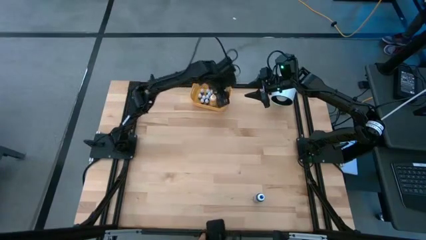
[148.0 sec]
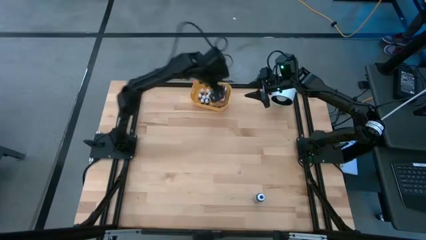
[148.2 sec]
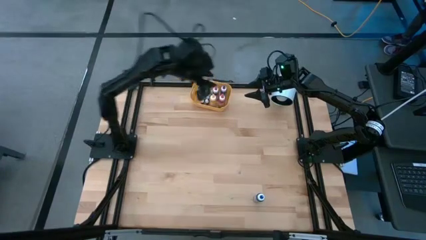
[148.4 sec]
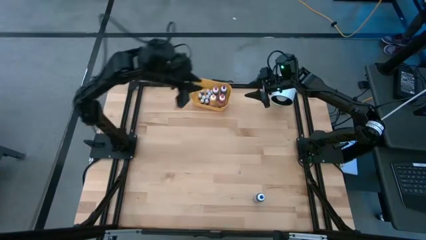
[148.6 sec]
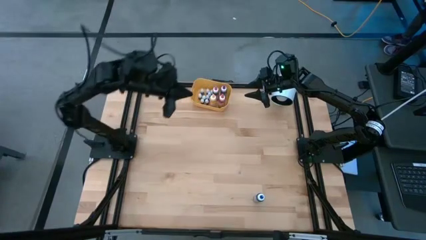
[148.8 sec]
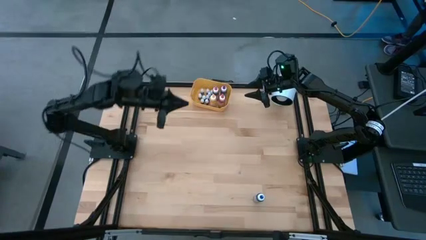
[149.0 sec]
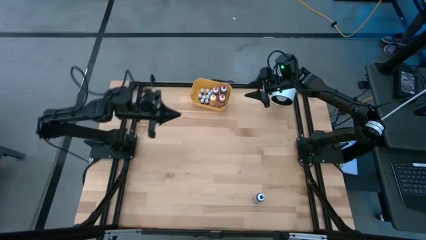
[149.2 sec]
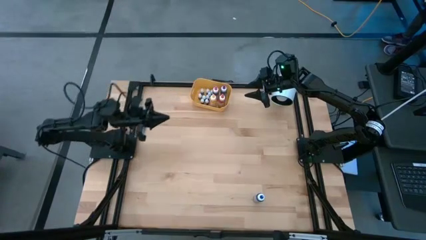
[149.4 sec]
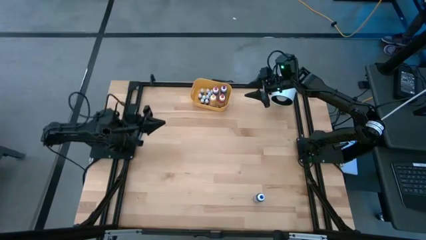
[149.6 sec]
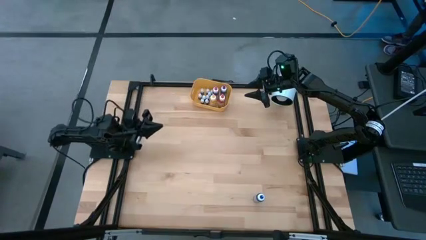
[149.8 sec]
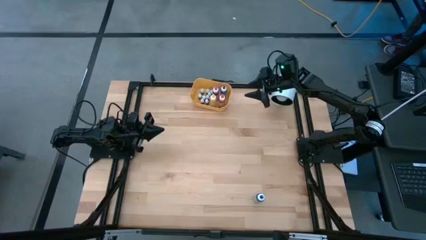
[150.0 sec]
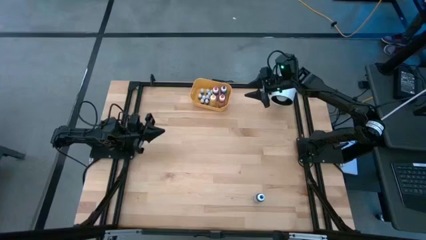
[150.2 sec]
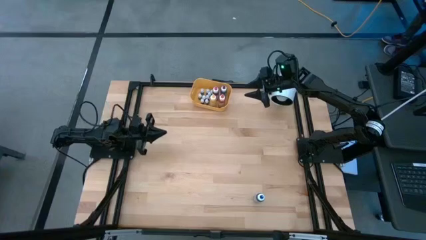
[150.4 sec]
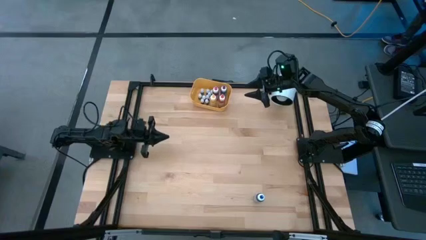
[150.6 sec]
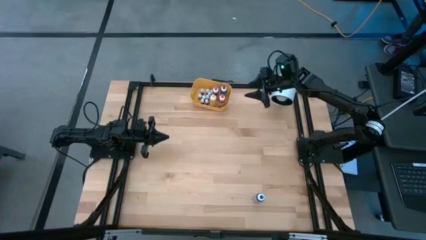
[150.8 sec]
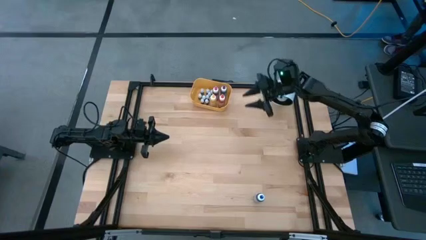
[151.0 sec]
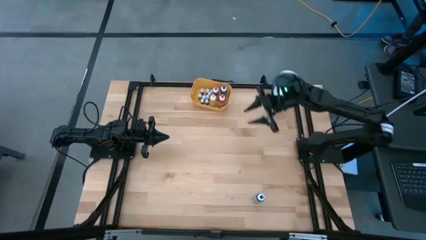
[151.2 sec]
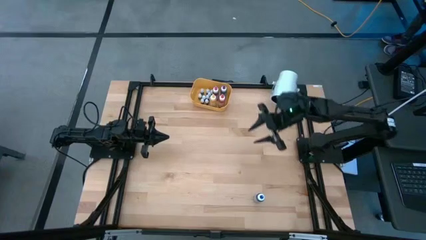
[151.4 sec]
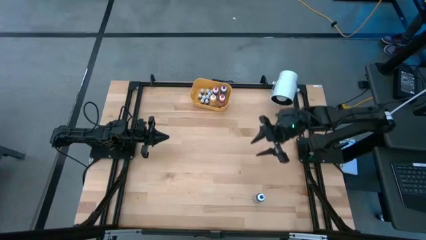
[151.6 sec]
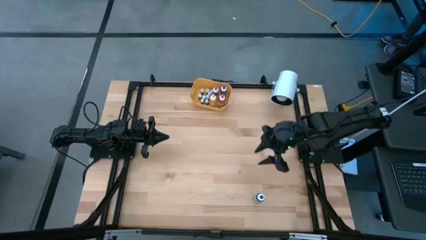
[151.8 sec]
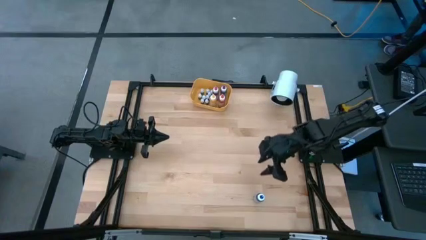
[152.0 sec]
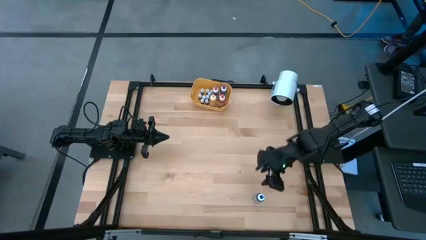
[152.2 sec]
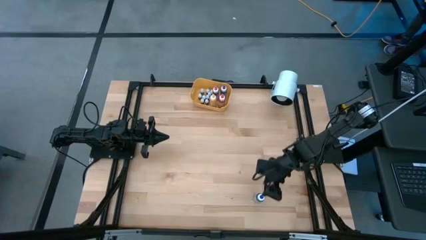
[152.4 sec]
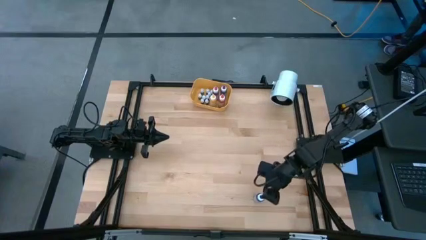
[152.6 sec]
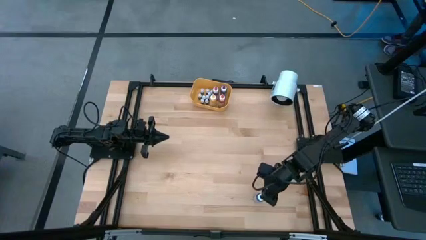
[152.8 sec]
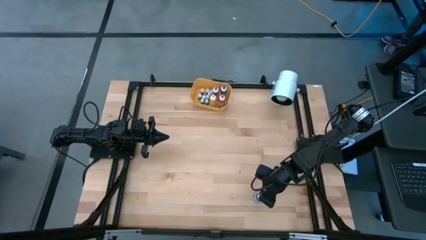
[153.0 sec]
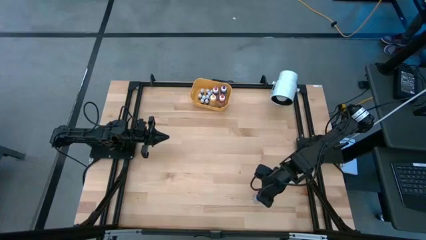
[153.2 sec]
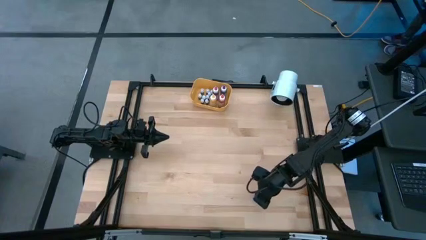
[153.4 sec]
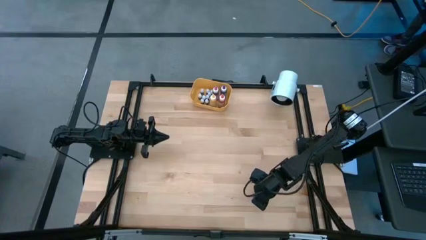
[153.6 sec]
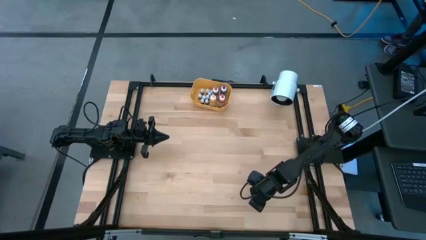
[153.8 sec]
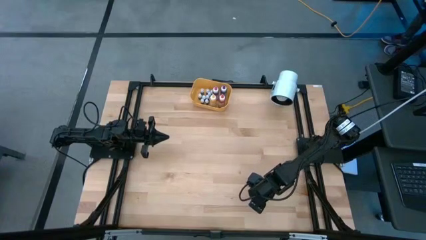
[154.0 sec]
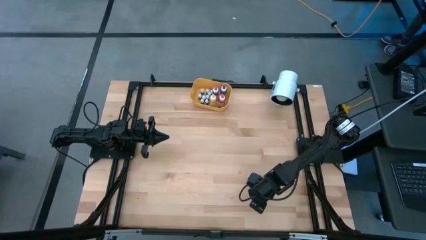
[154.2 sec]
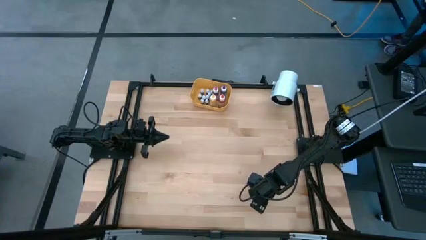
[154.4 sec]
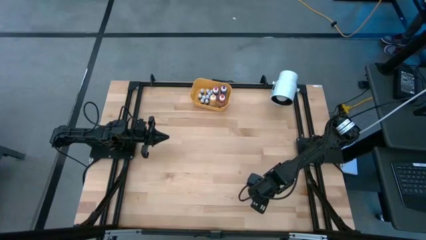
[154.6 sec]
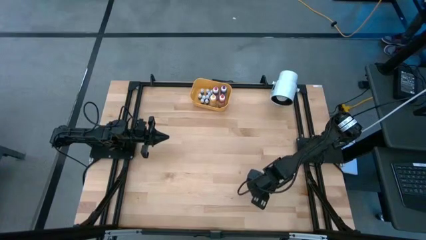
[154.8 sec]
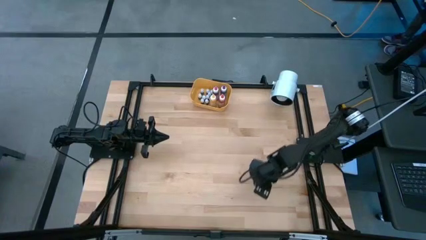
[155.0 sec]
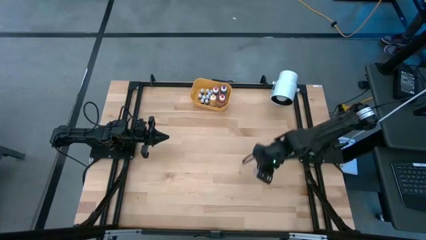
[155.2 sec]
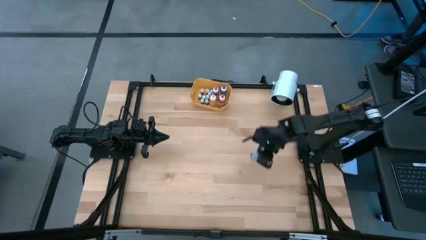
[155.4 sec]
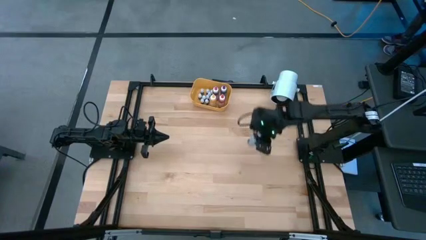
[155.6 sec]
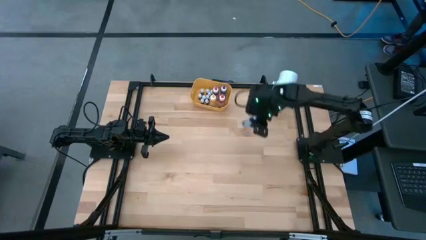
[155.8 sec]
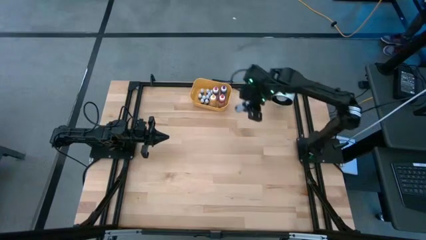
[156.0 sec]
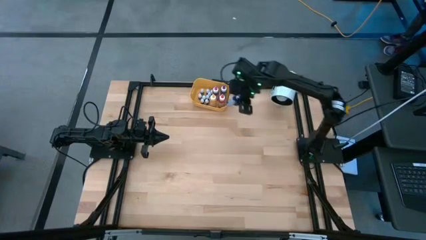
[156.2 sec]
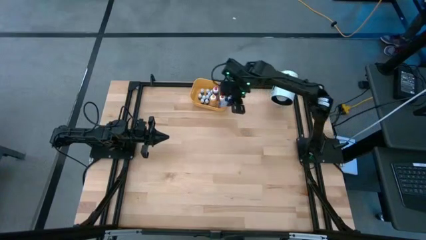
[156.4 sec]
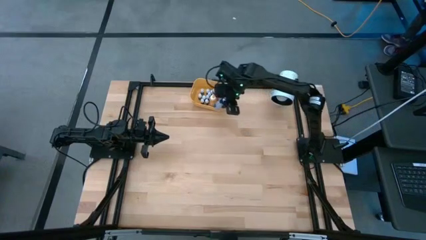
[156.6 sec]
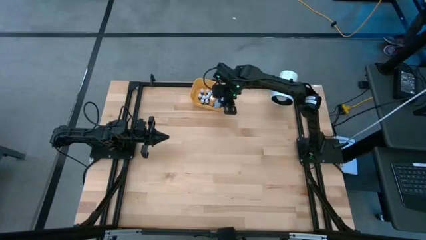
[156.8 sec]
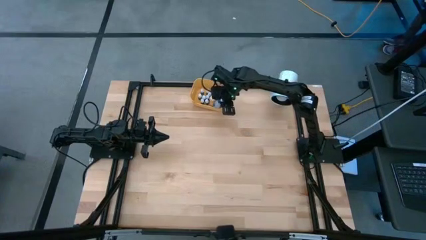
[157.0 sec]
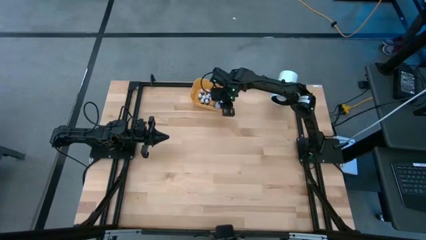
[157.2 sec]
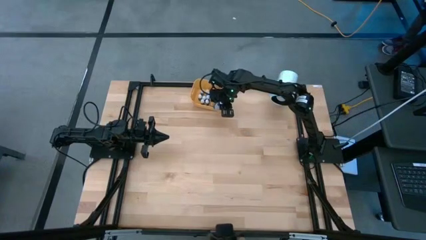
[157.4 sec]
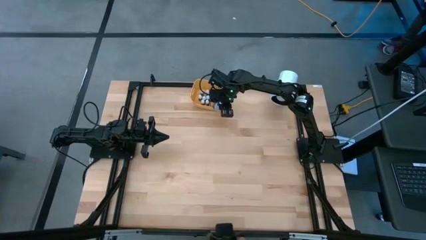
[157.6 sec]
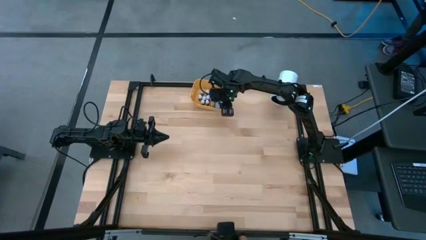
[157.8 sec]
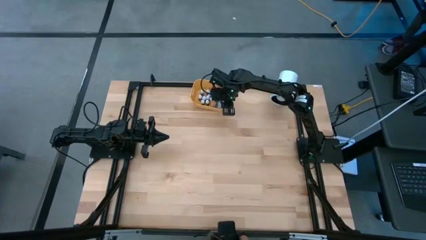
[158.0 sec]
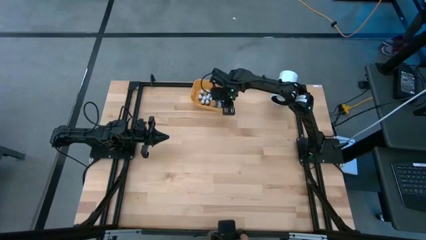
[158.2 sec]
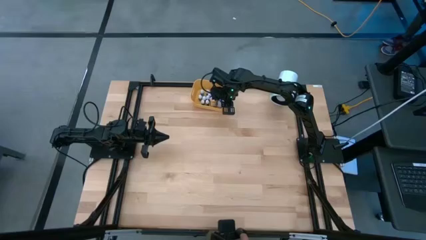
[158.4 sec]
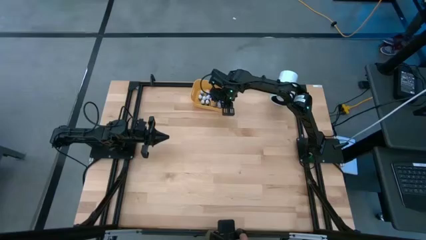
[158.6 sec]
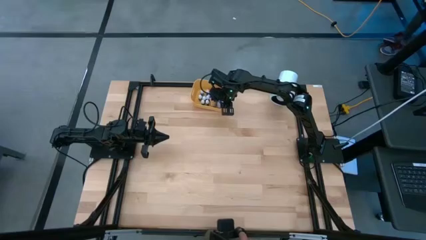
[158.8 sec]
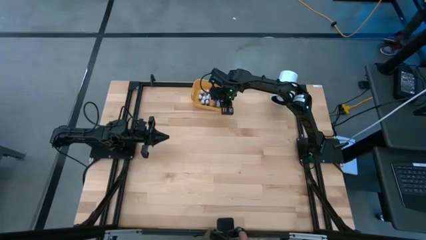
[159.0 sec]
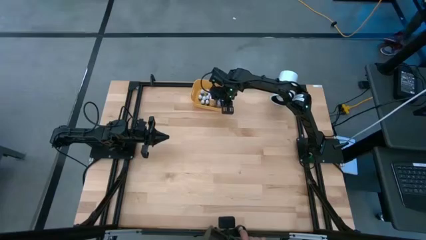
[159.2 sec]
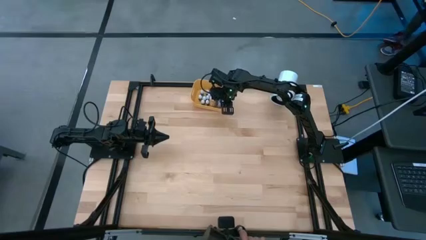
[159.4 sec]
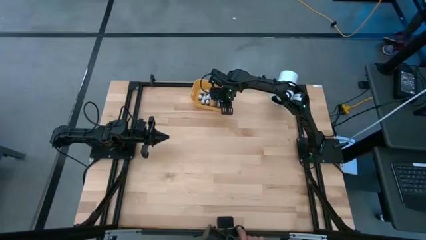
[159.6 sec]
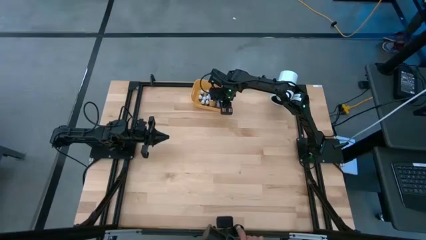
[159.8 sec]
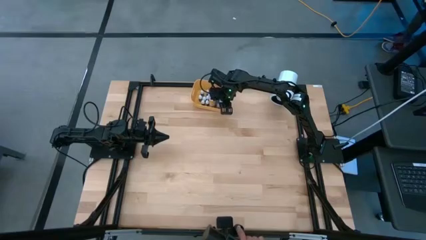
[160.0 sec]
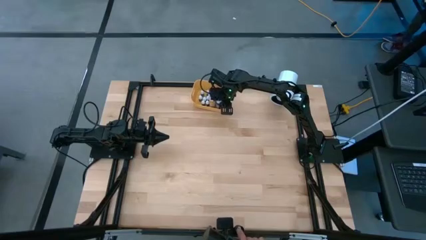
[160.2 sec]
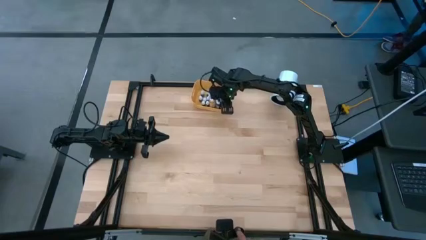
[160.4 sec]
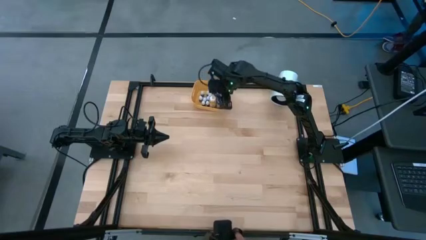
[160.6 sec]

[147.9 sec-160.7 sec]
Task: Pick & Place food coloring
Put the large blue food coloring bottle into the bin

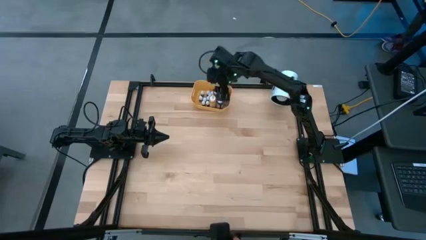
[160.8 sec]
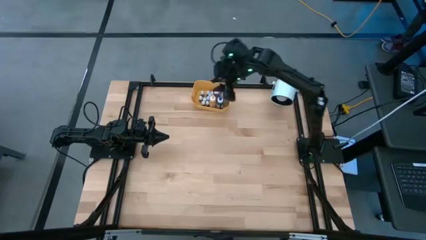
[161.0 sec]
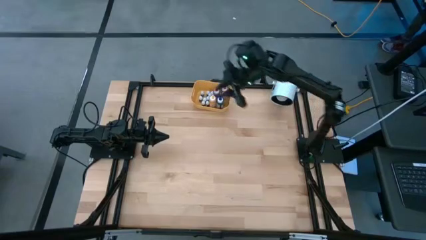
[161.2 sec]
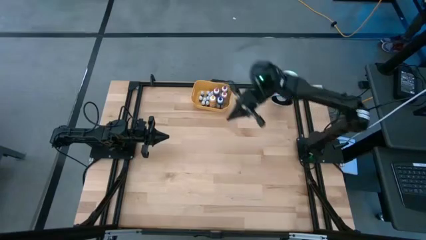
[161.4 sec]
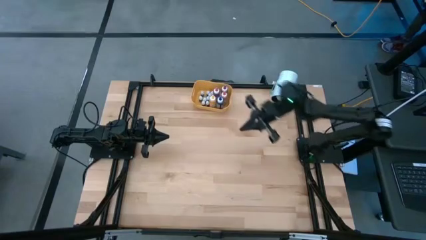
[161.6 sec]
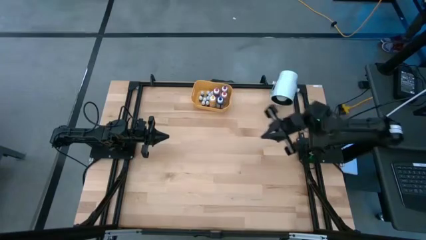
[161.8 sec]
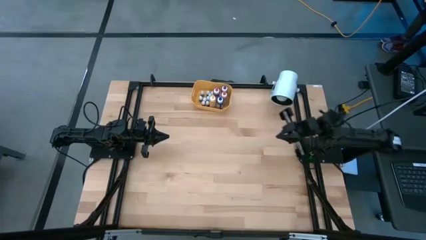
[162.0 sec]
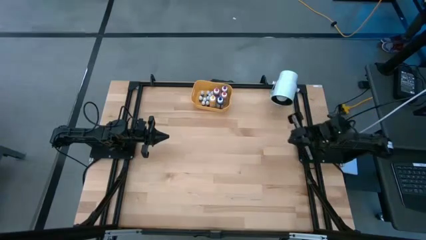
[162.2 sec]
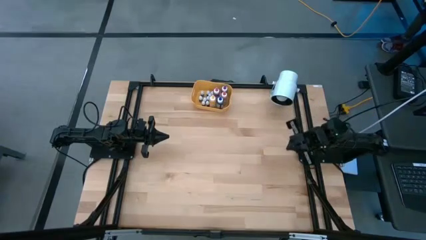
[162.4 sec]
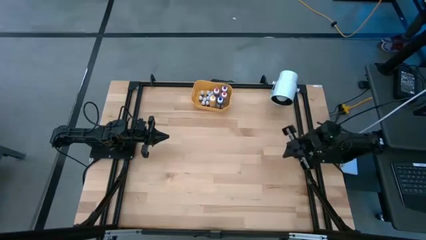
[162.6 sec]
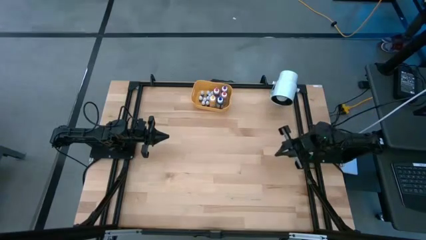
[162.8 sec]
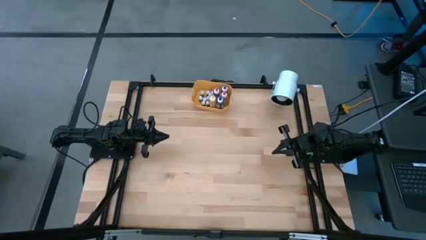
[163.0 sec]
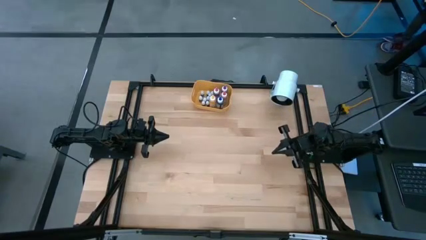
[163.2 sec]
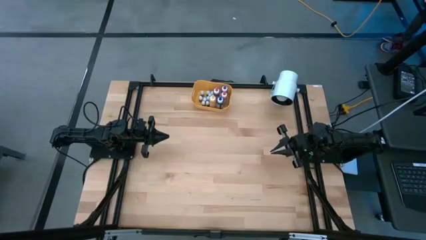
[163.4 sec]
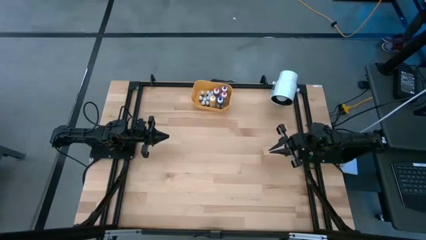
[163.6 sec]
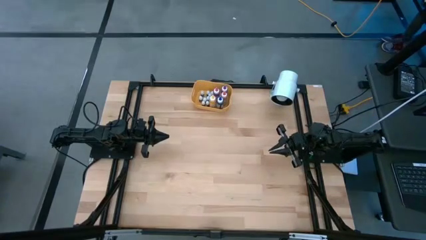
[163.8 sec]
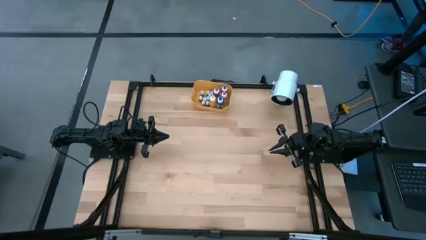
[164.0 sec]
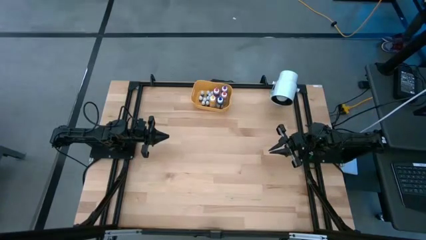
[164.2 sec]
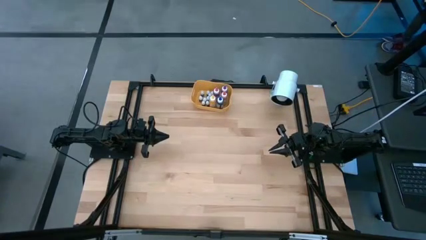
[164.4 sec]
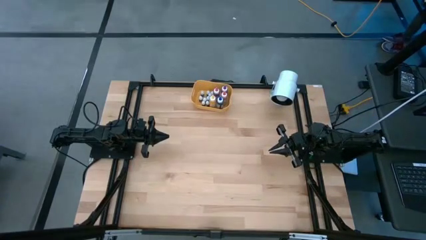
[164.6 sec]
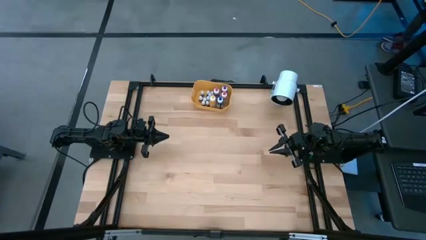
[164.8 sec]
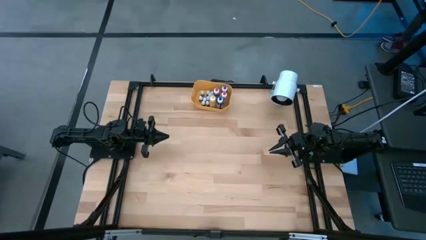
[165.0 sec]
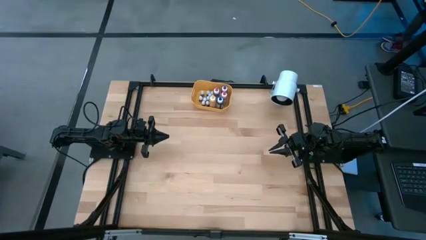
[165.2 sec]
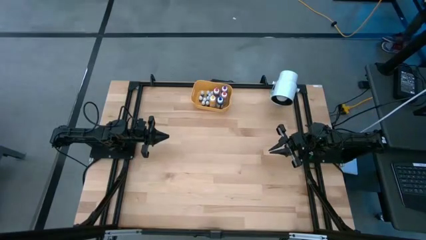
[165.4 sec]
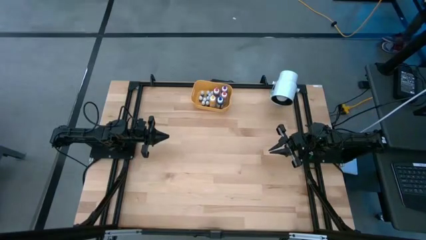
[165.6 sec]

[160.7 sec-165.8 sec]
Return to Home Position
